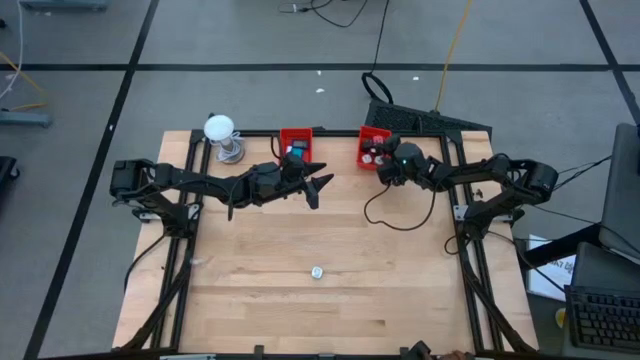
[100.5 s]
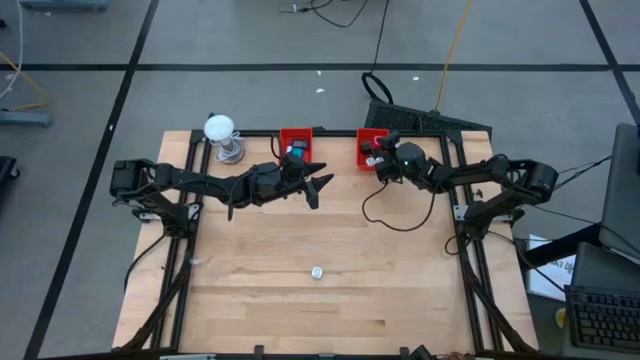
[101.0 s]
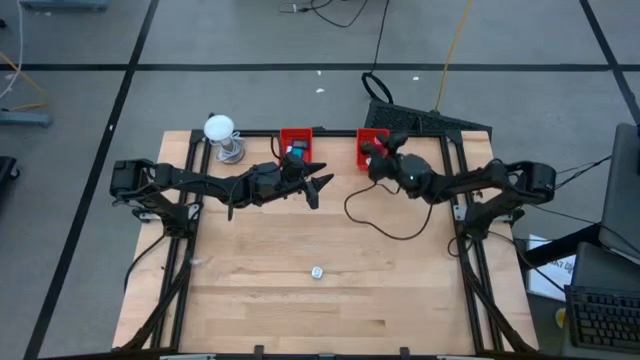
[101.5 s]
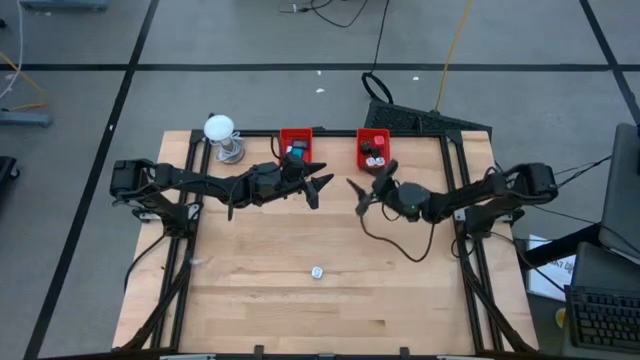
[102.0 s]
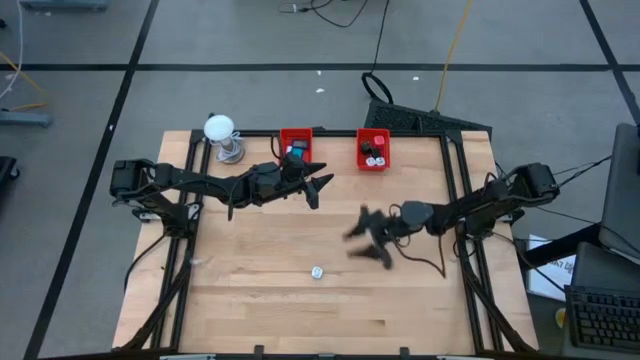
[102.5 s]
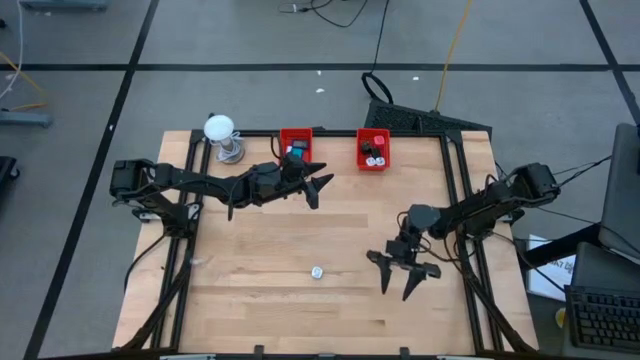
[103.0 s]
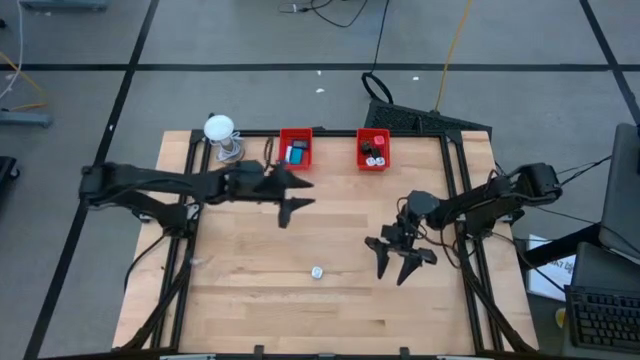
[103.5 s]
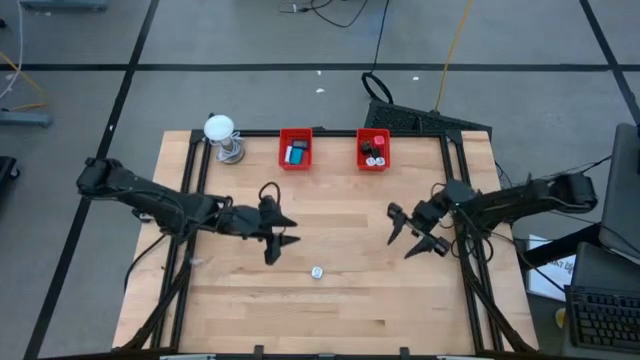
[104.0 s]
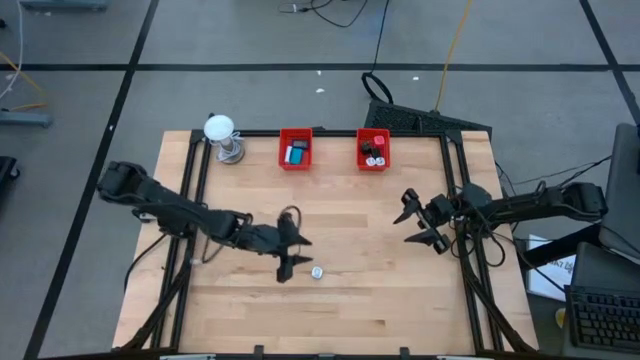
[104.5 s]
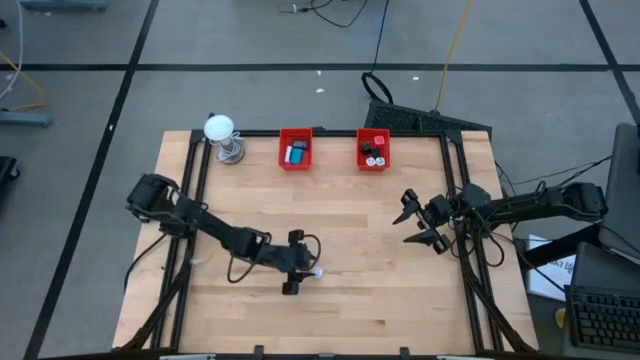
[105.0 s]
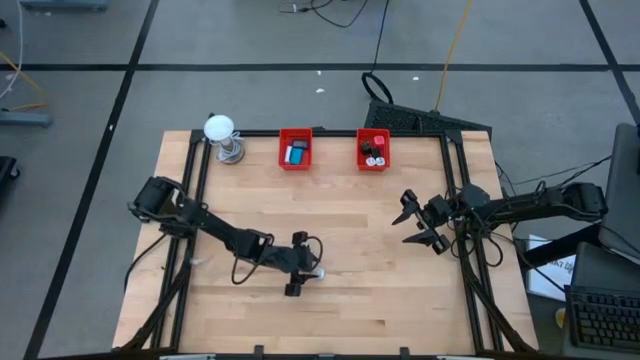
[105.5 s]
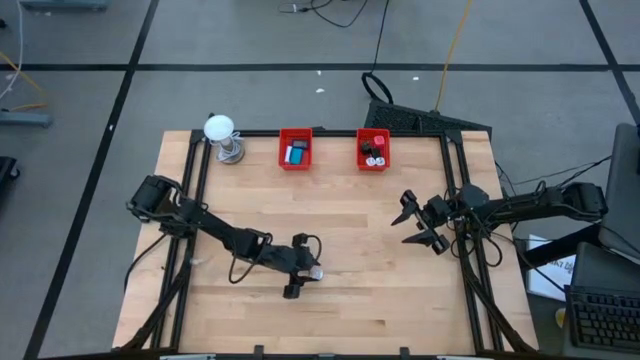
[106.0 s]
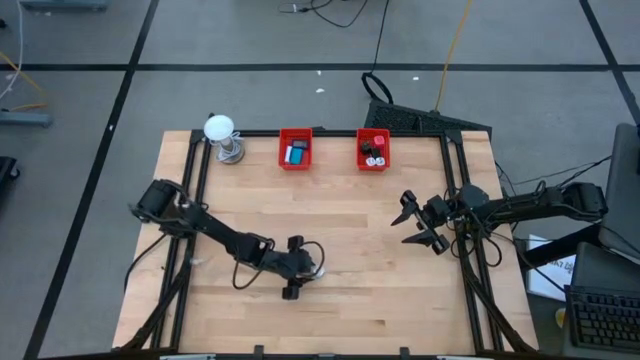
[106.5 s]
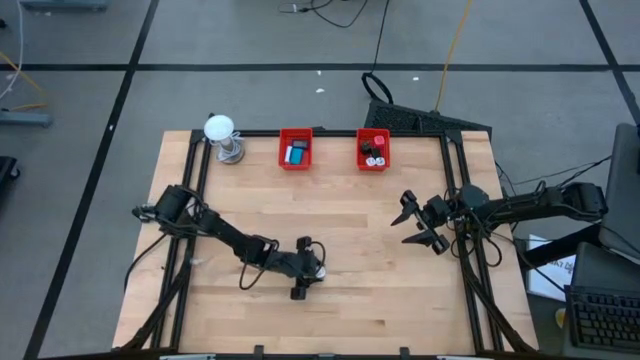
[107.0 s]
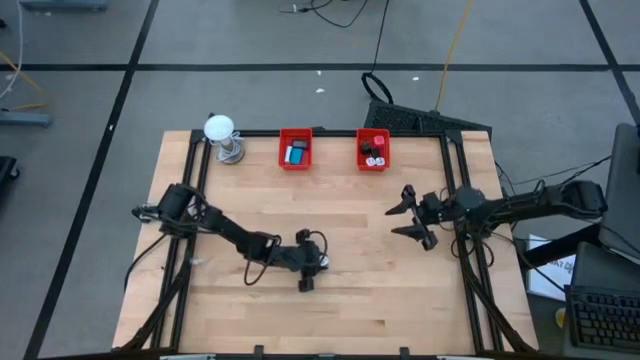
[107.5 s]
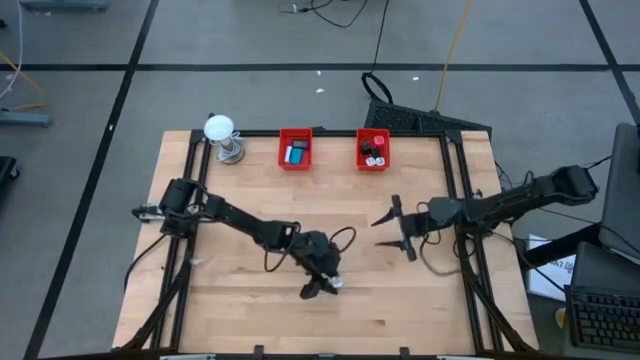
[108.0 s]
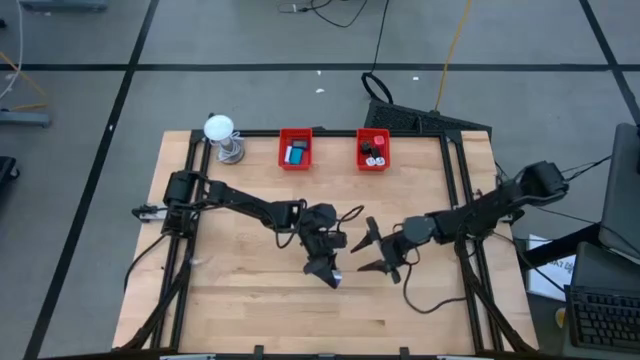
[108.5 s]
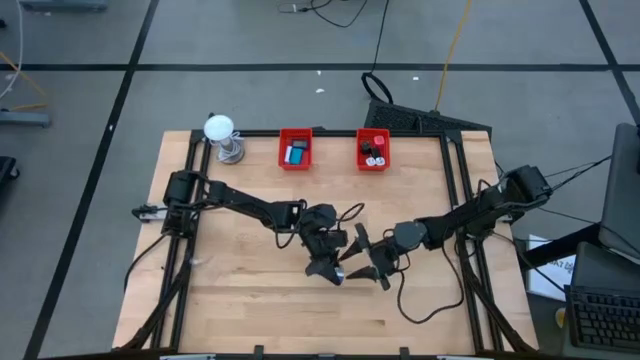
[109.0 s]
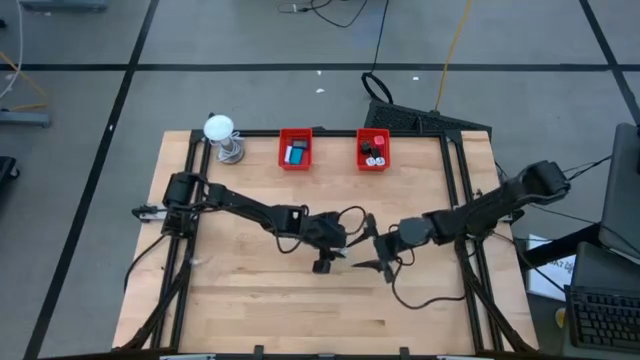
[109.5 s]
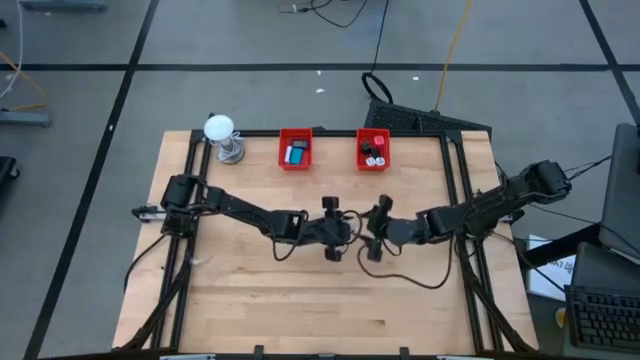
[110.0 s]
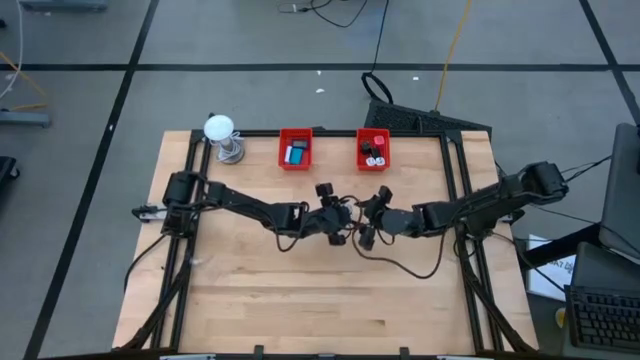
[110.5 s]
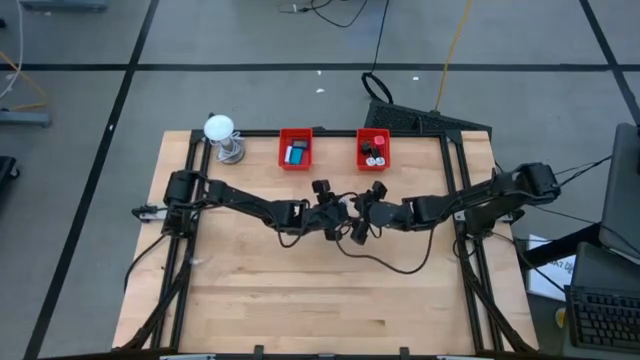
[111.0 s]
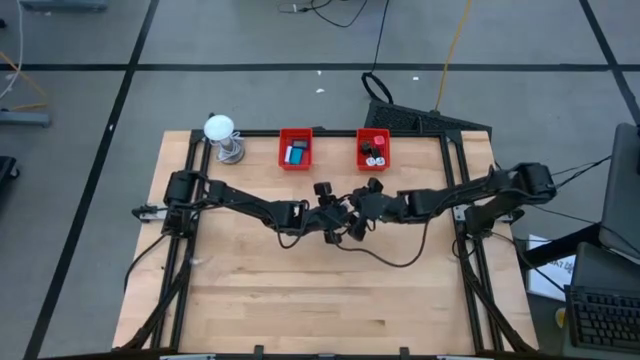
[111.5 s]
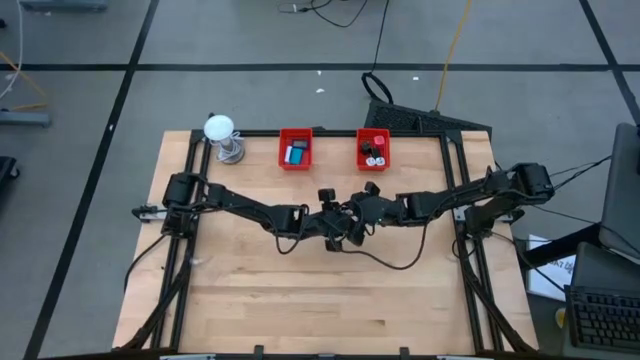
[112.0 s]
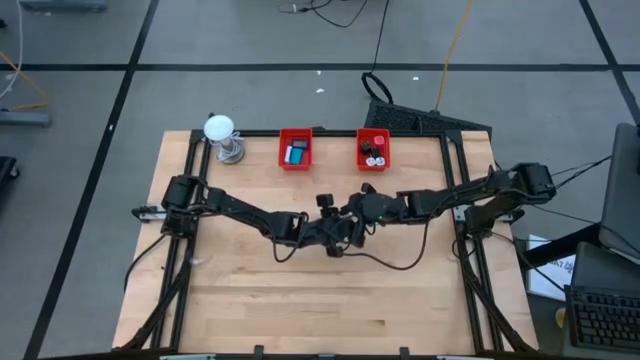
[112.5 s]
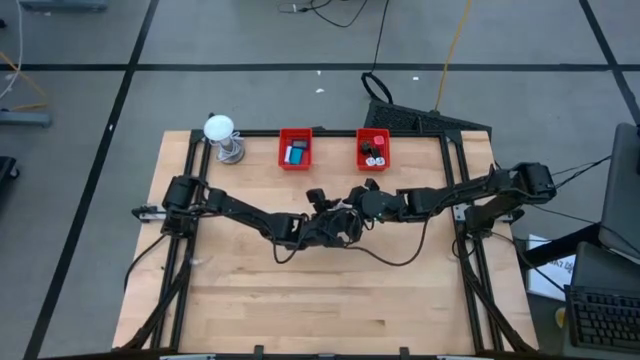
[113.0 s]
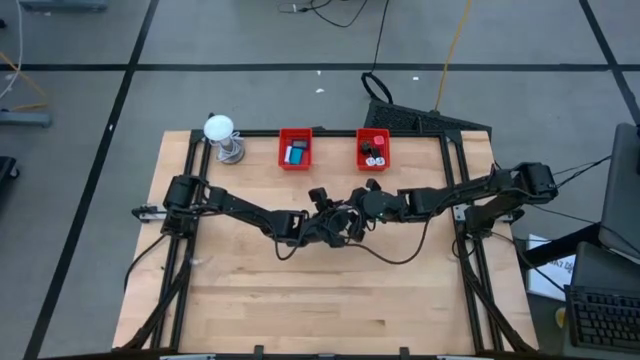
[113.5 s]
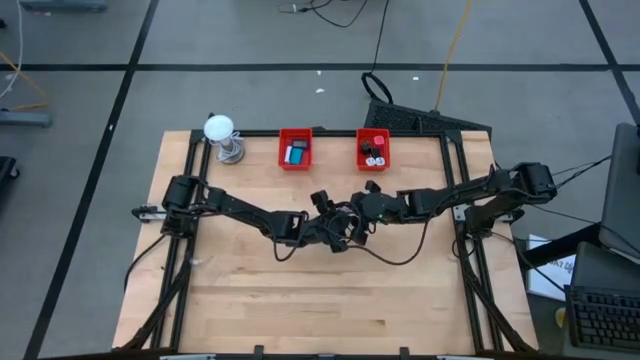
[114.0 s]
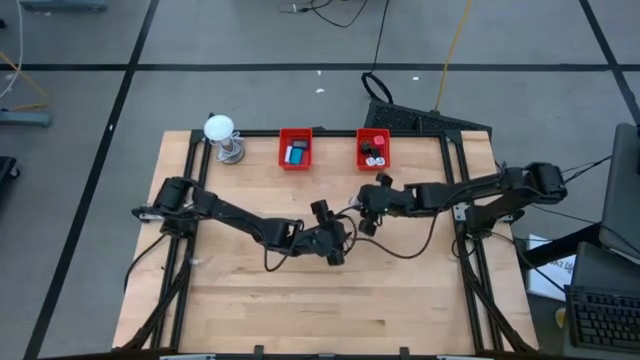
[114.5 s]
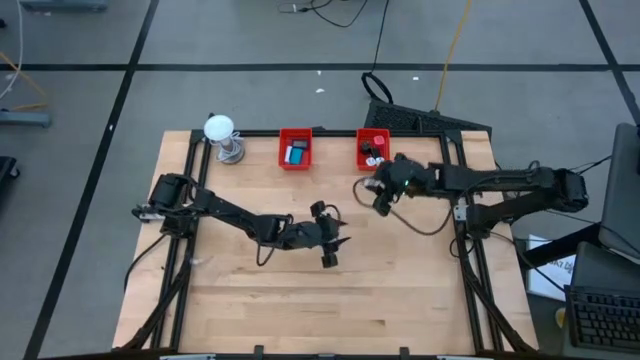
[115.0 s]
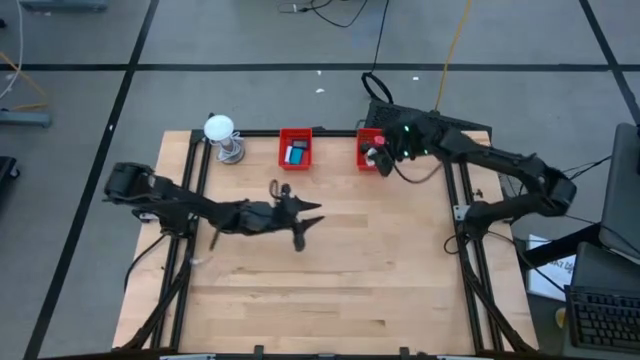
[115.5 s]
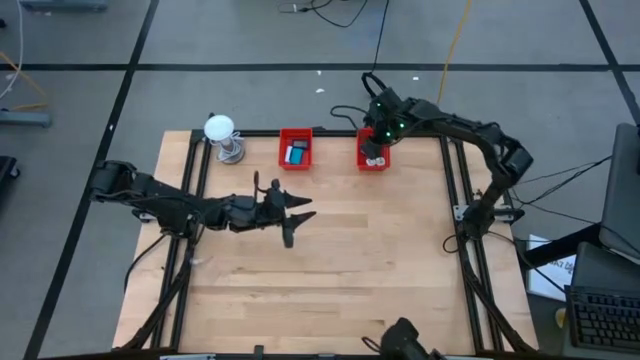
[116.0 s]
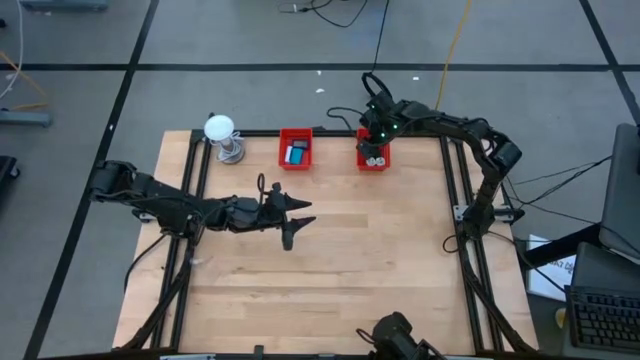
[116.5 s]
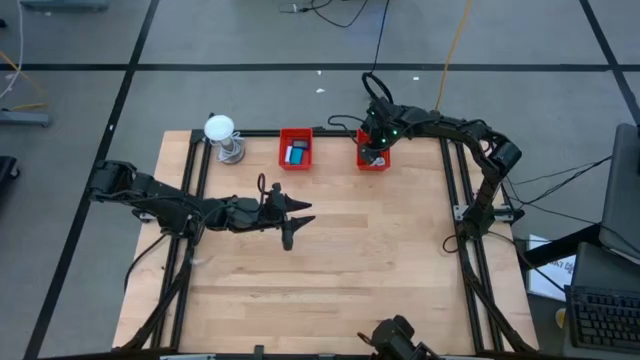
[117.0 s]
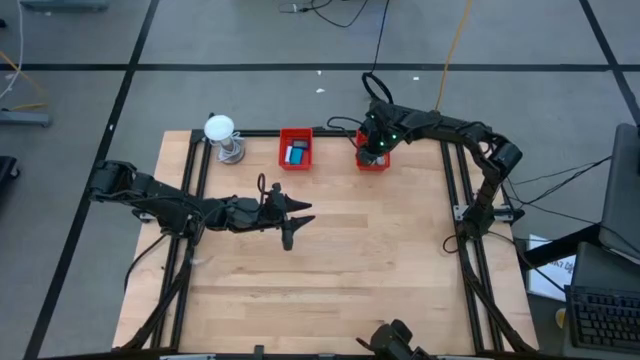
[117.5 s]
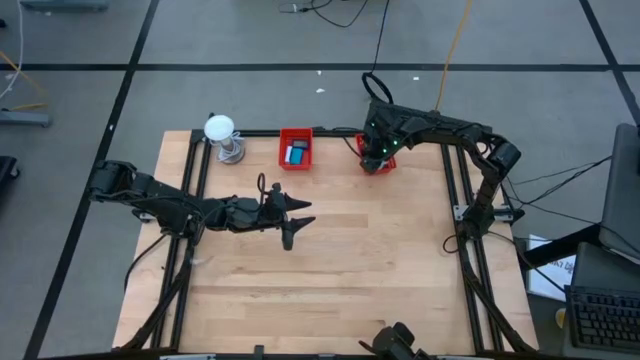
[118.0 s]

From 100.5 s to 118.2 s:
Task: Pick & Place Office items
Put the purple charger adapter into the right red basket
